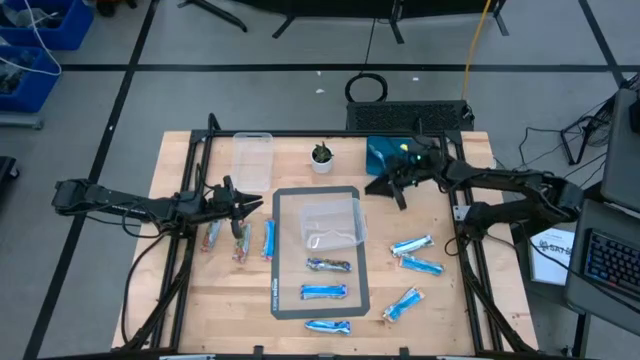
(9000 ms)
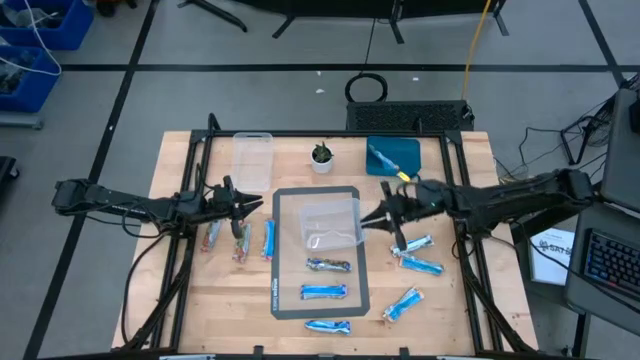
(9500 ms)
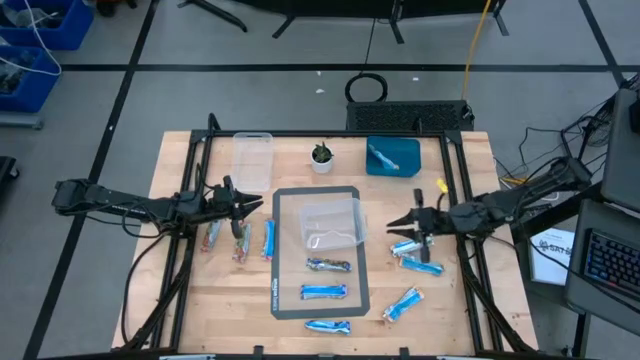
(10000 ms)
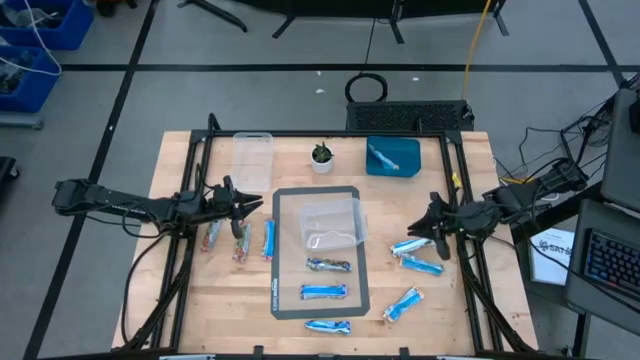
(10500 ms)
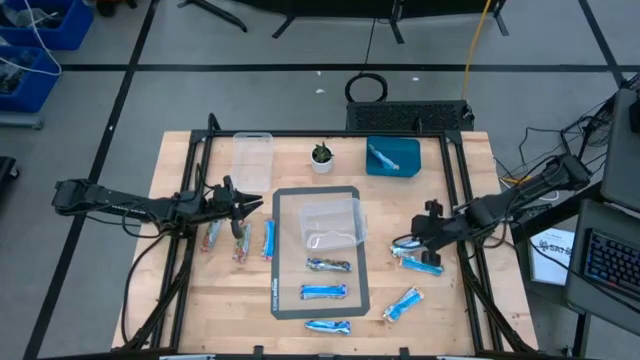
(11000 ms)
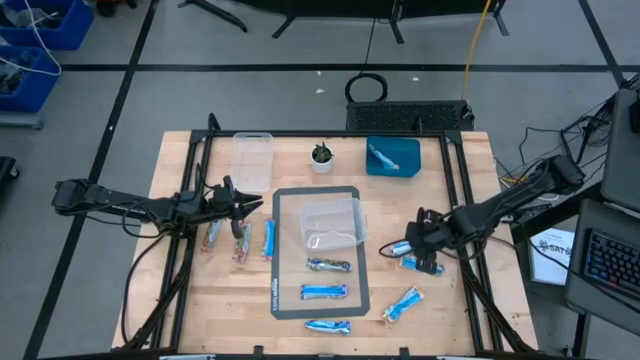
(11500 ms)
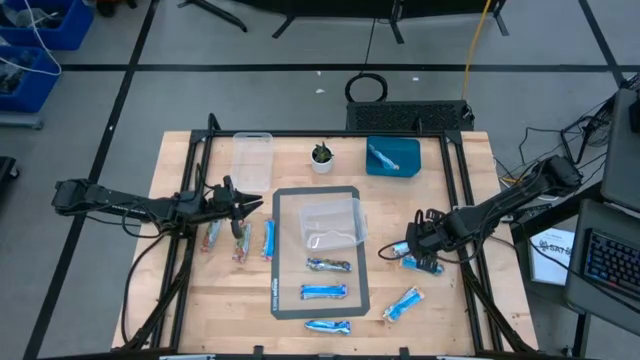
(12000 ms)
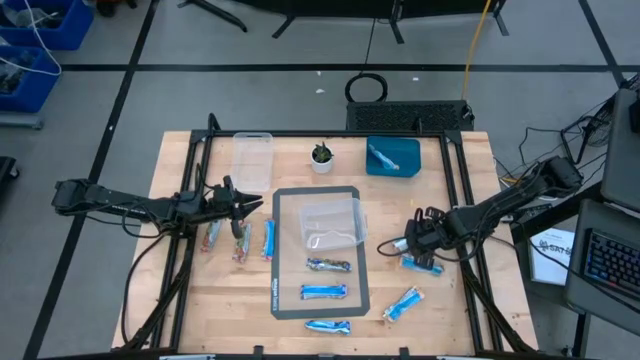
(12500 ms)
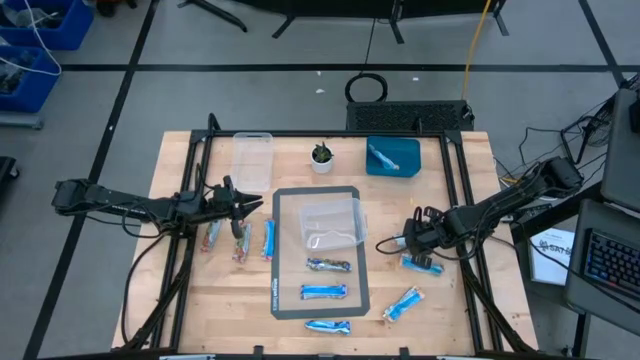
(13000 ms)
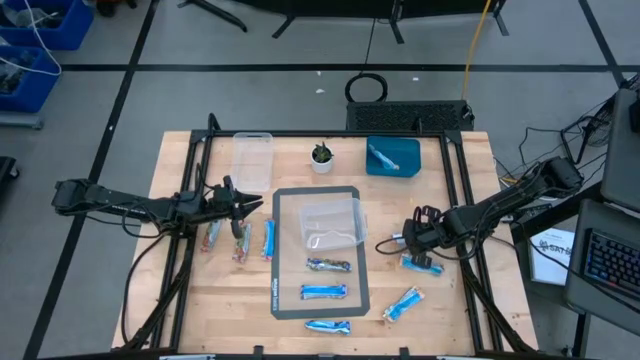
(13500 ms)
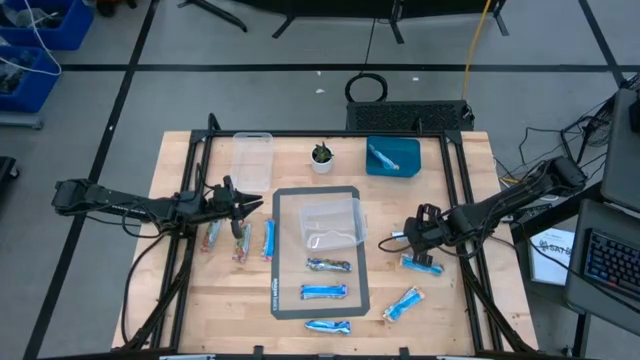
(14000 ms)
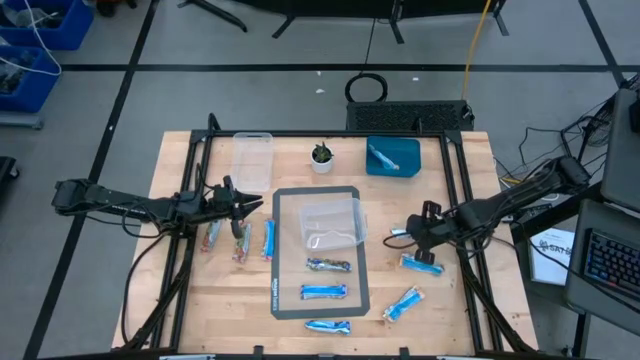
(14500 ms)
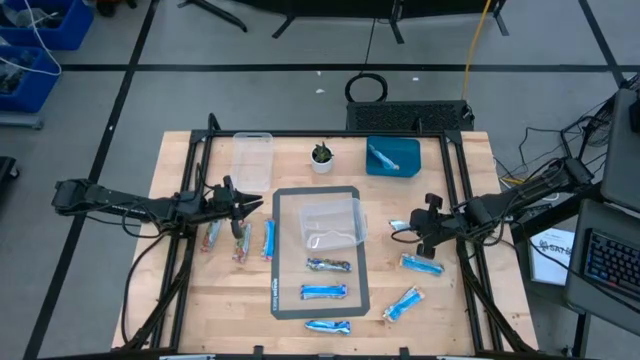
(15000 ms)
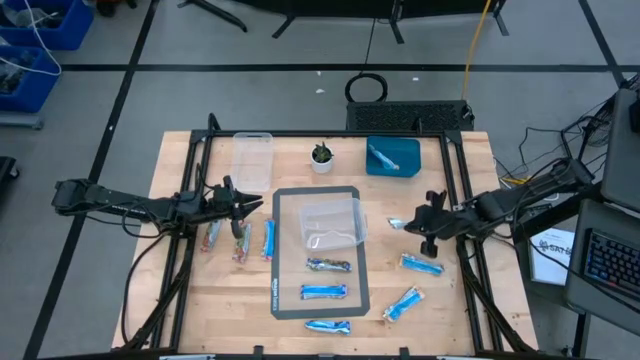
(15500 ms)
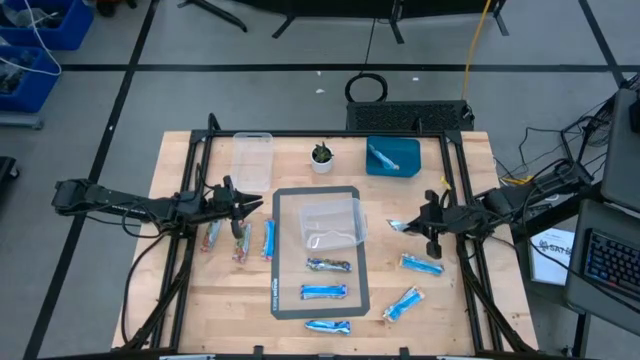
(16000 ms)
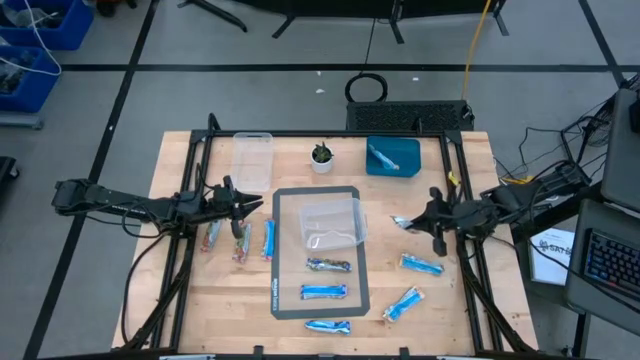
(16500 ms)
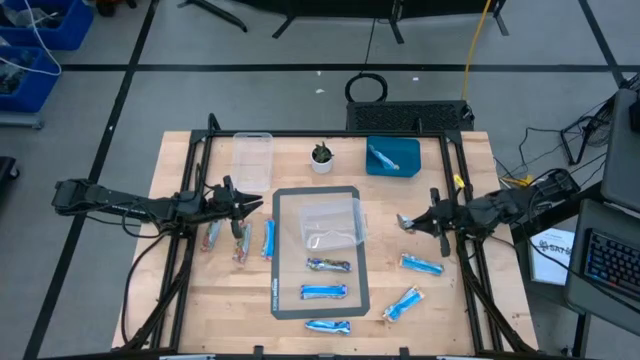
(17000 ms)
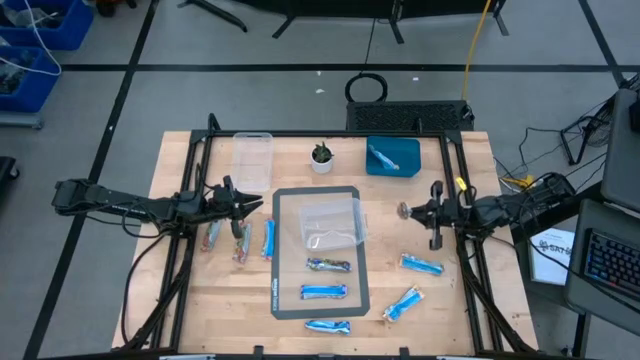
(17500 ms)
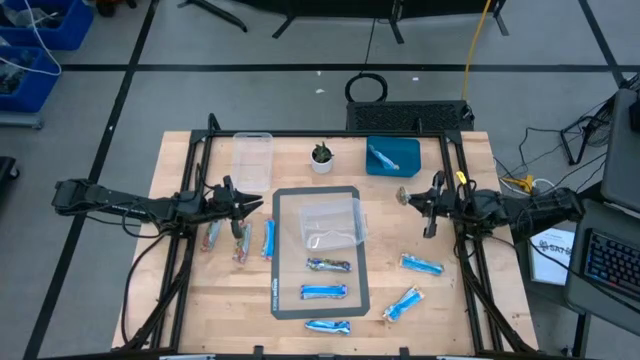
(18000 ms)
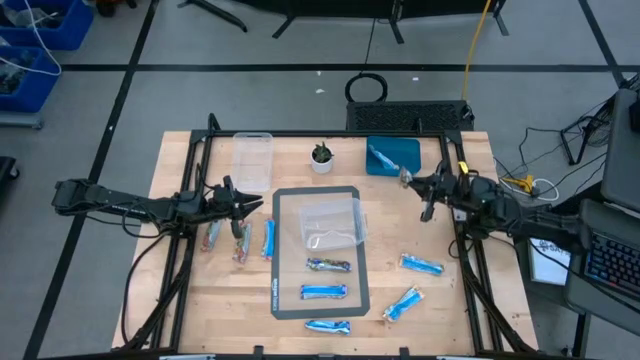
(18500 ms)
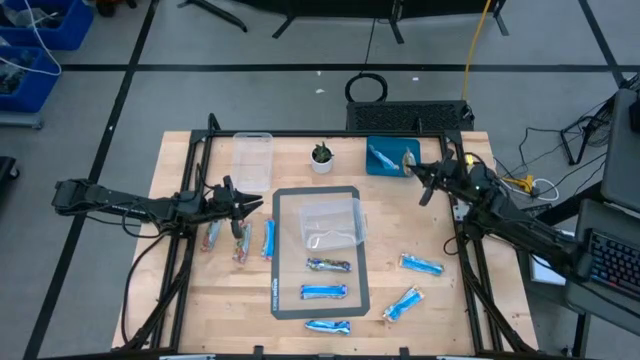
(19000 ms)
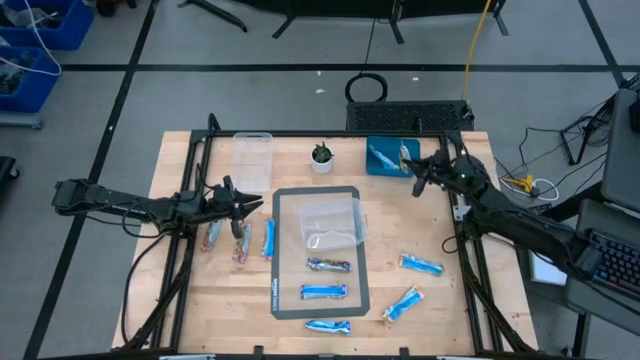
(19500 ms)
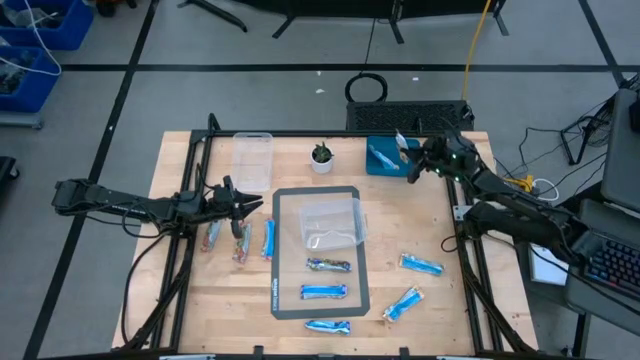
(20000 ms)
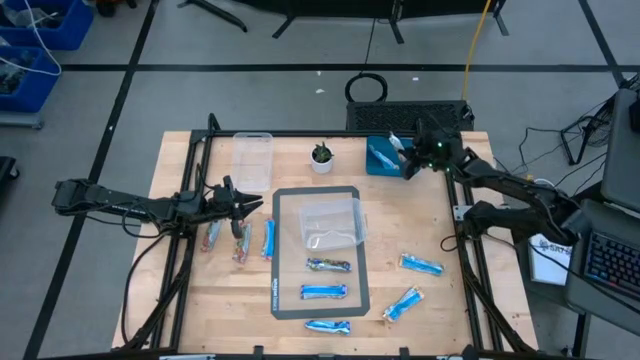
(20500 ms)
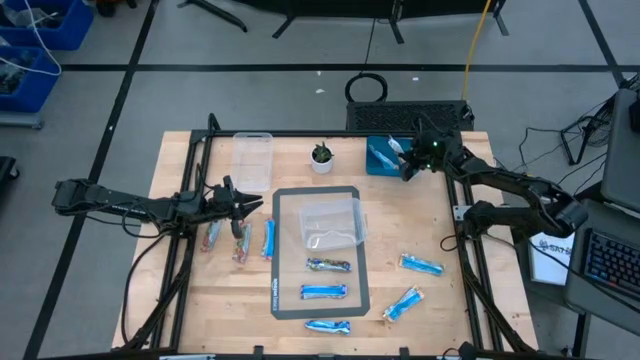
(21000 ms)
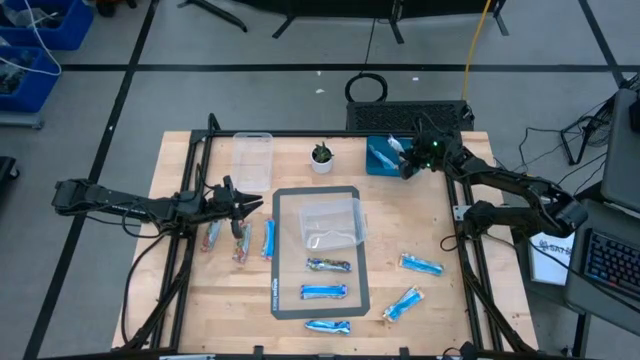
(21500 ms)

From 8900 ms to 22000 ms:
Task: Pick and place Granola Bars by type
Put the snack into the right bin

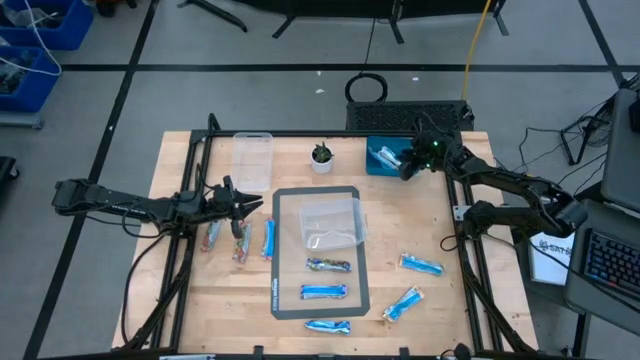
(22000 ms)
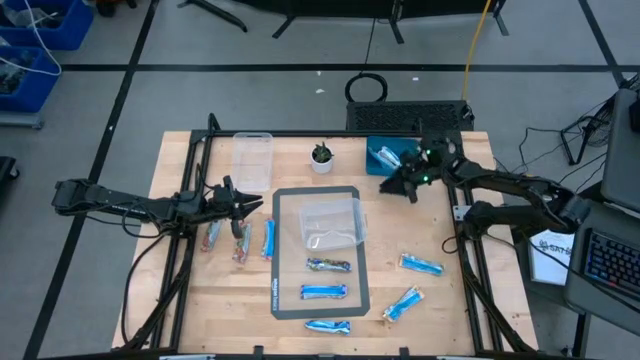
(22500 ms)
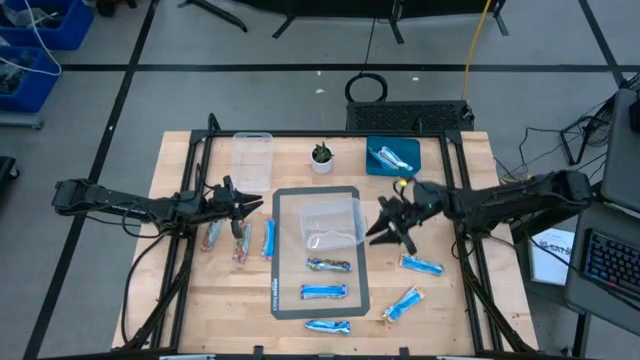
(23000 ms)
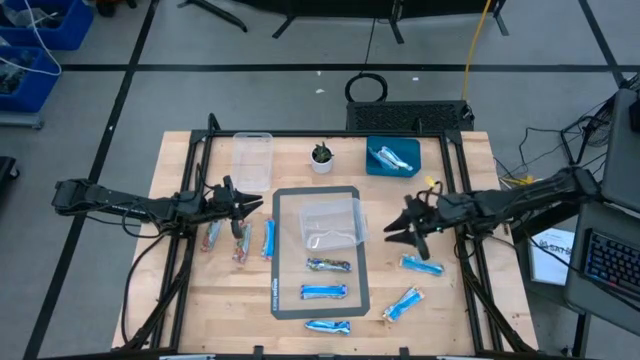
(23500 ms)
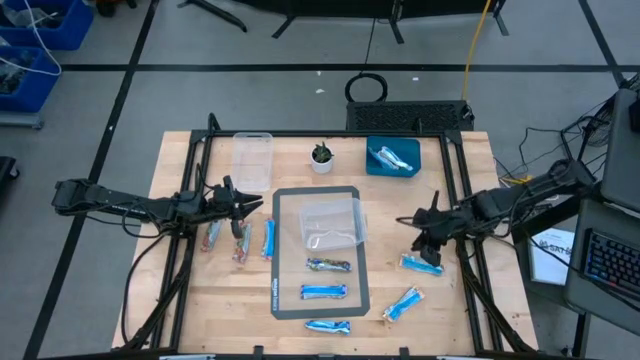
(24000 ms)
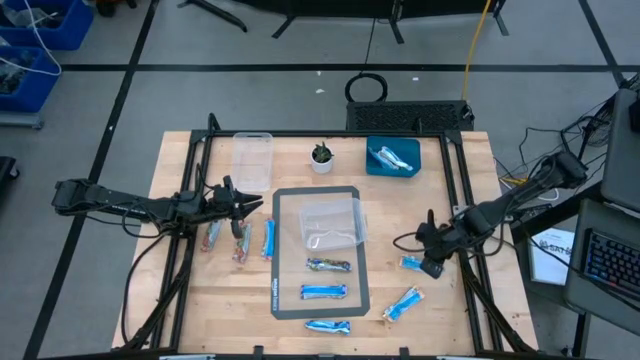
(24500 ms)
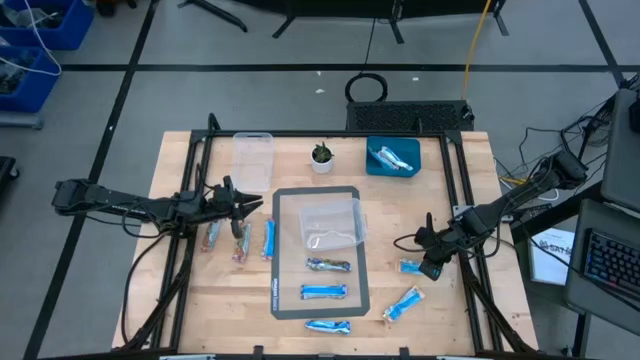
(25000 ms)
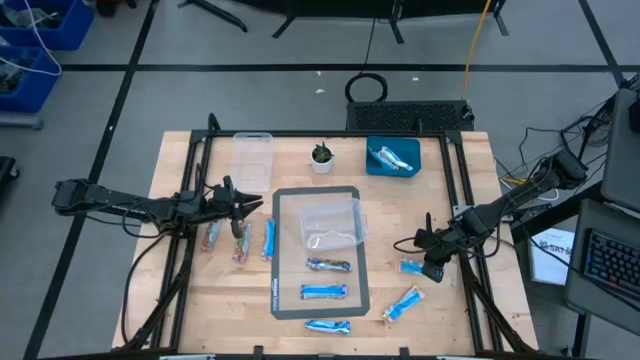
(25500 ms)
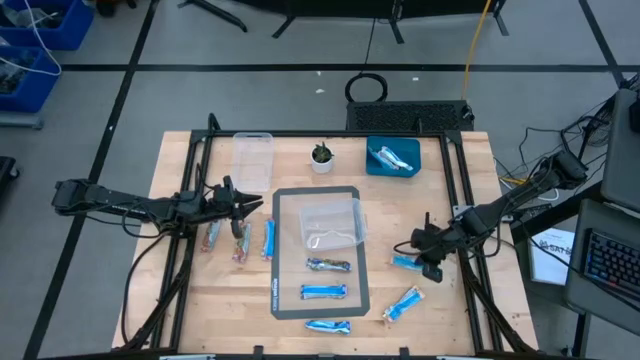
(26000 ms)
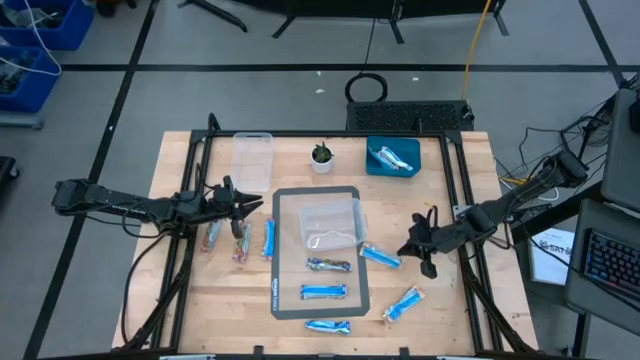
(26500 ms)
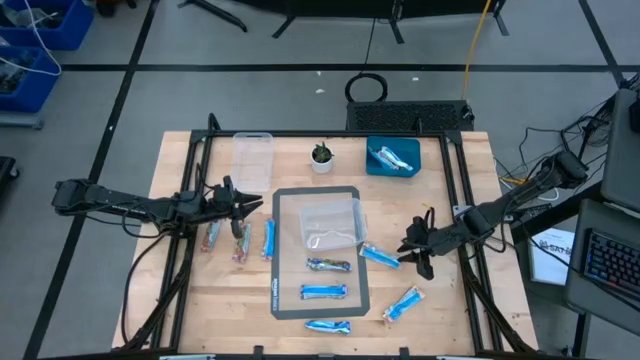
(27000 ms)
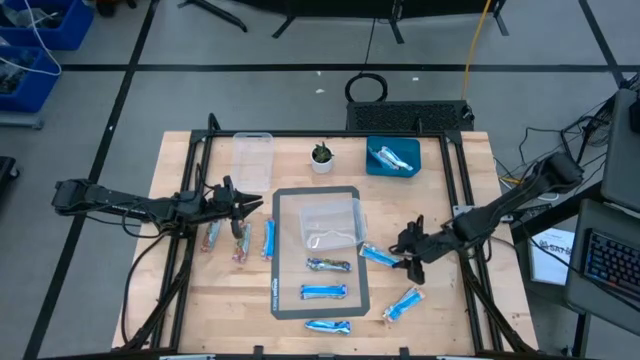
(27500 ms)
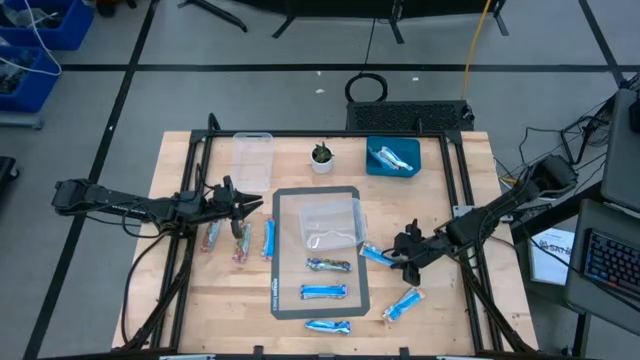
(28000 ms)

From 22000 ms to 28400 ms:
Put the snack into the right bin

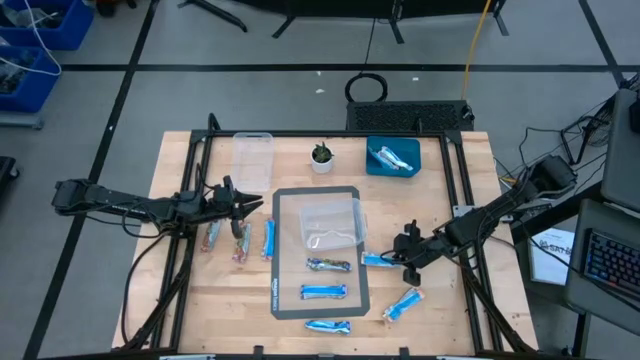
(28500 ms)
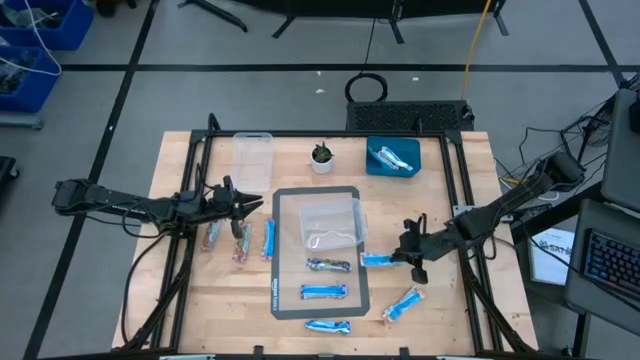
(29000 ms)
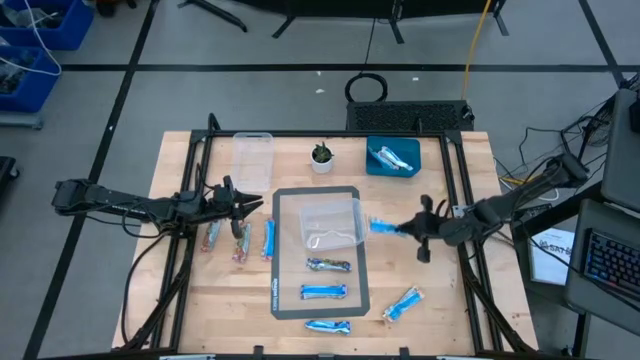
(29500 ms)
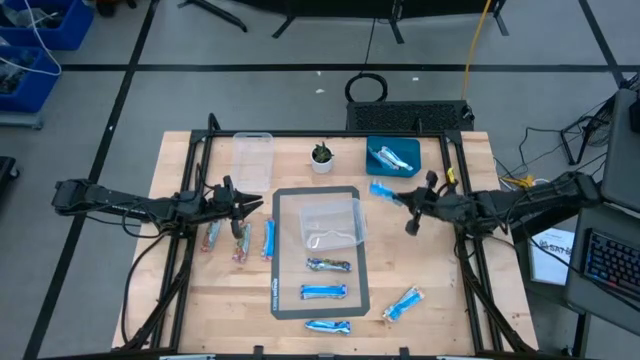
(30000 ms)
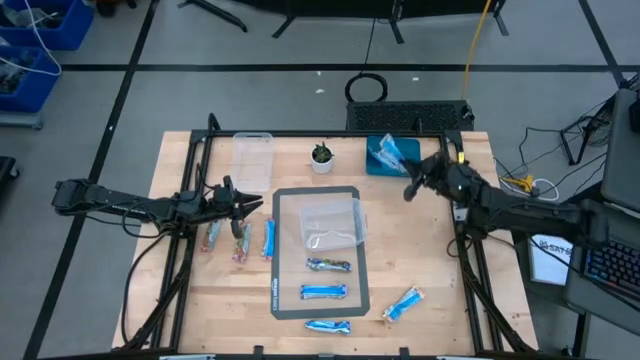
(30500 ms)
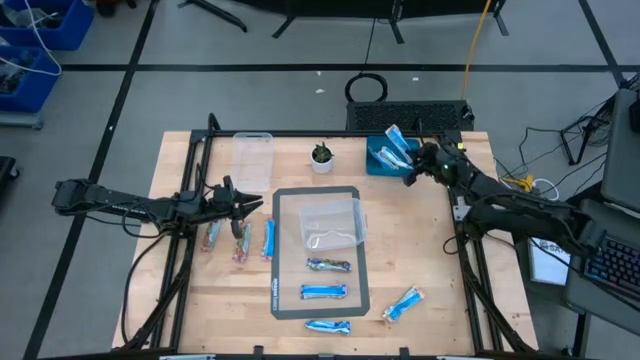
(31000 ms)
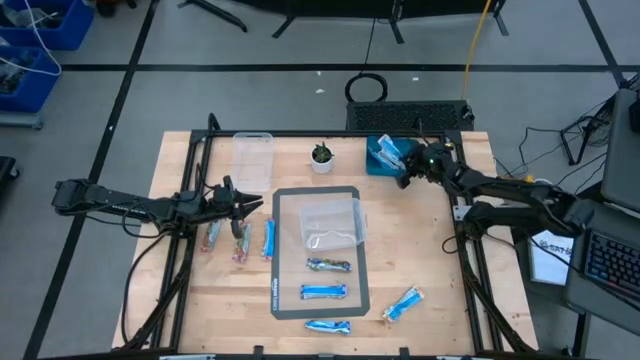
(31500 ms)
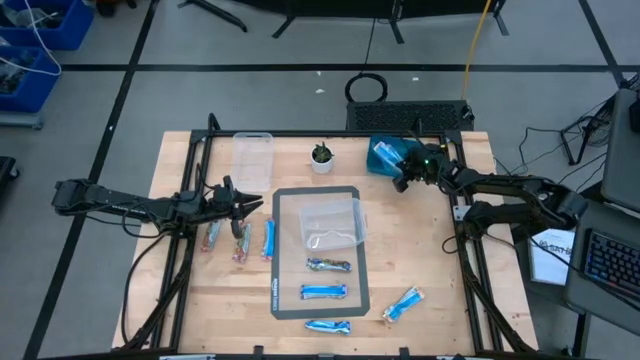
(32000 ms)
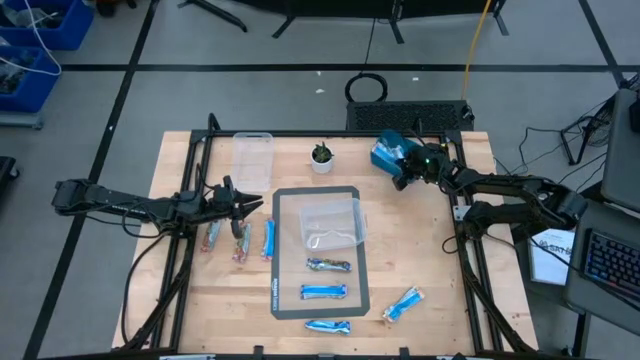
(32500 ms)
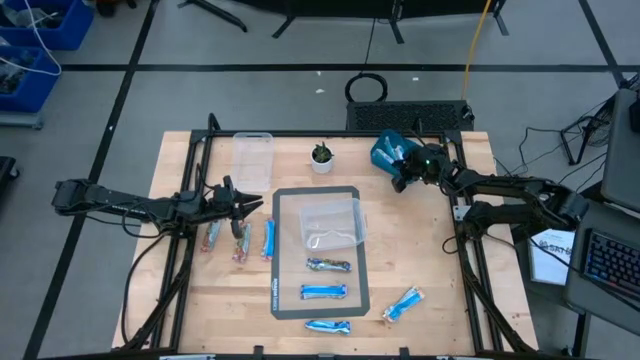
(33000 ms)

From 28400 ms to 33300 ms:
Put the snack into the right bin
